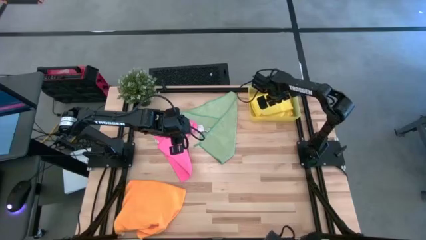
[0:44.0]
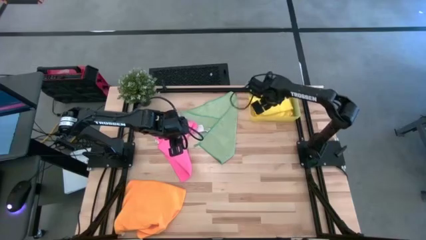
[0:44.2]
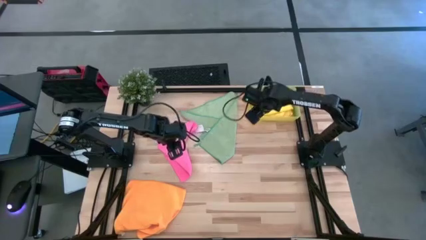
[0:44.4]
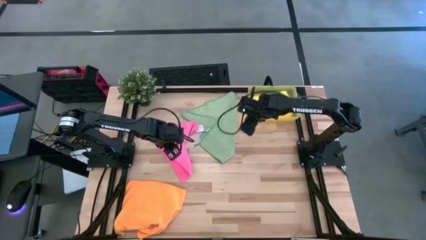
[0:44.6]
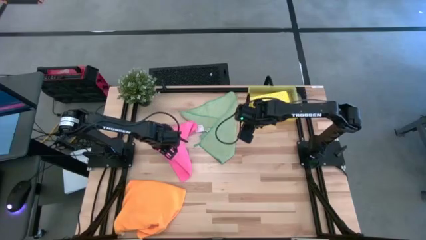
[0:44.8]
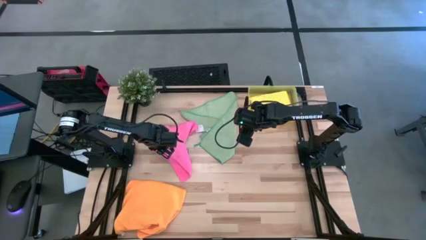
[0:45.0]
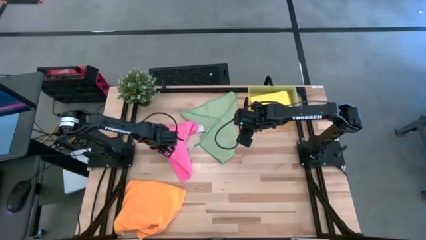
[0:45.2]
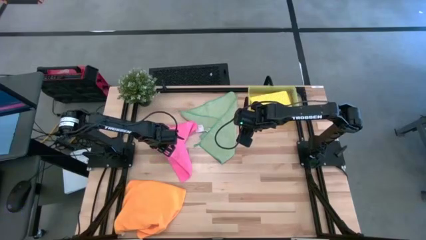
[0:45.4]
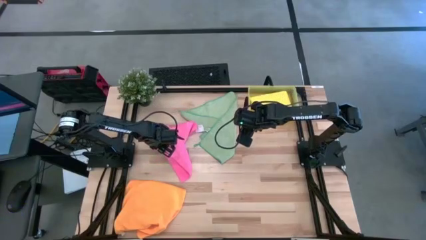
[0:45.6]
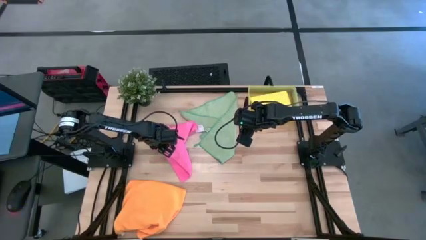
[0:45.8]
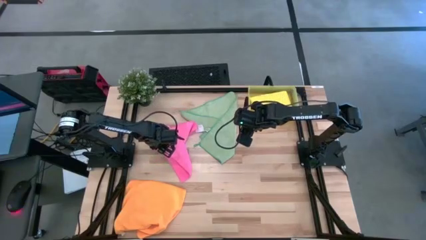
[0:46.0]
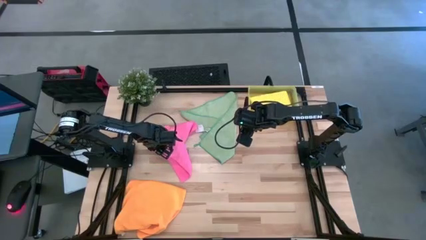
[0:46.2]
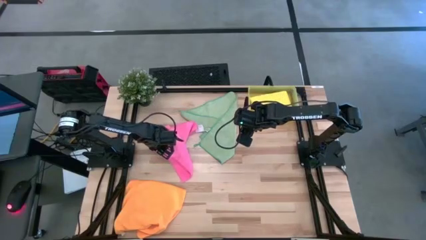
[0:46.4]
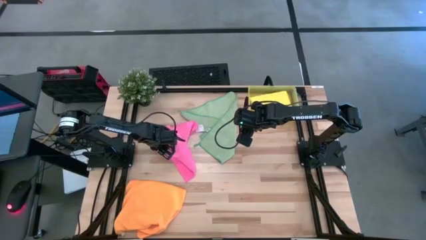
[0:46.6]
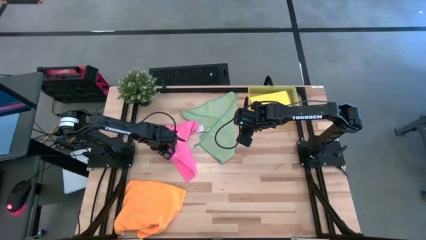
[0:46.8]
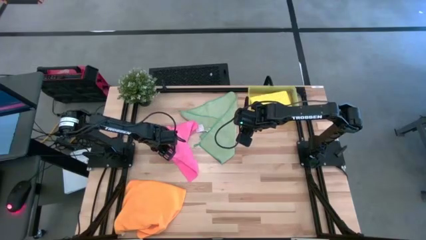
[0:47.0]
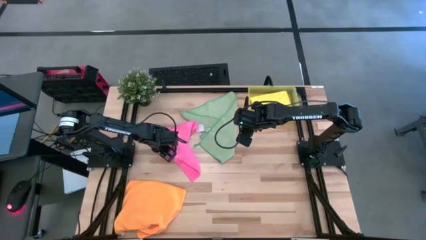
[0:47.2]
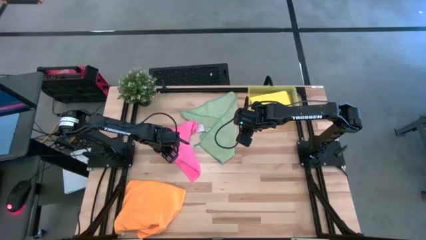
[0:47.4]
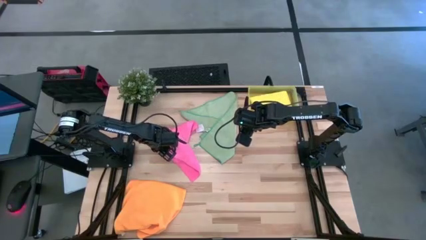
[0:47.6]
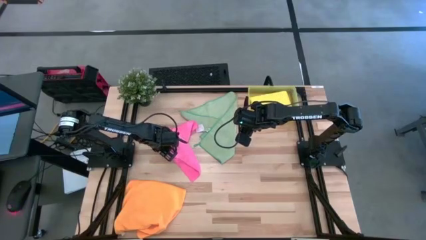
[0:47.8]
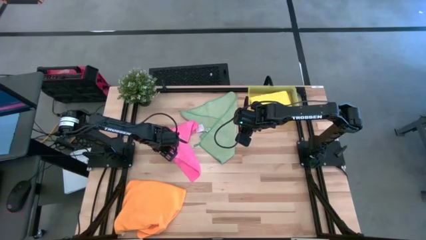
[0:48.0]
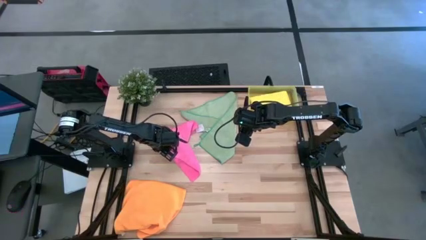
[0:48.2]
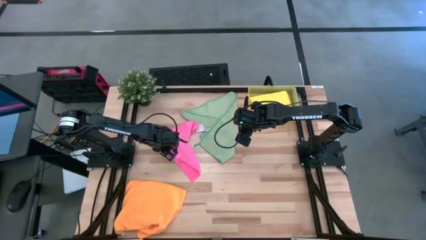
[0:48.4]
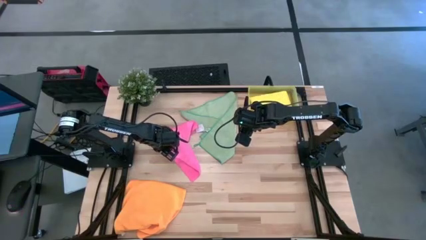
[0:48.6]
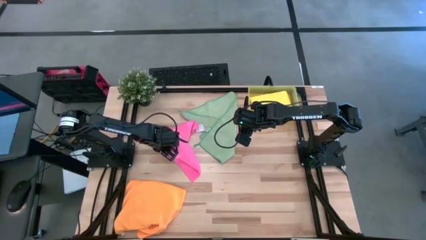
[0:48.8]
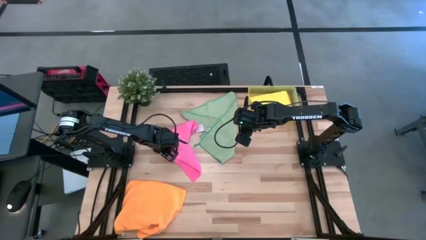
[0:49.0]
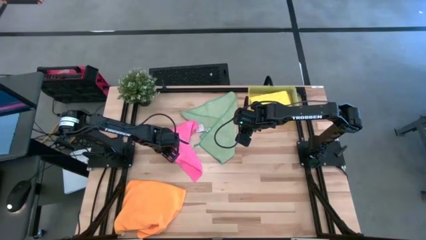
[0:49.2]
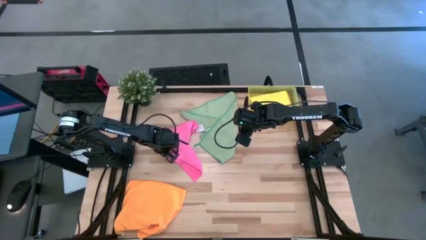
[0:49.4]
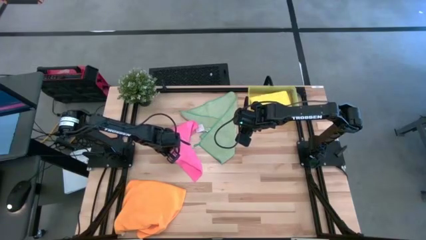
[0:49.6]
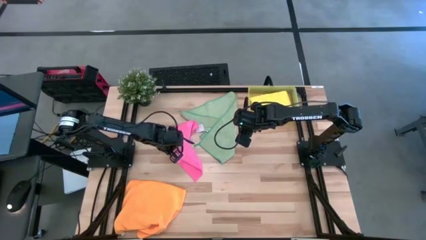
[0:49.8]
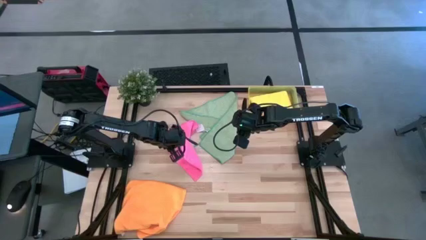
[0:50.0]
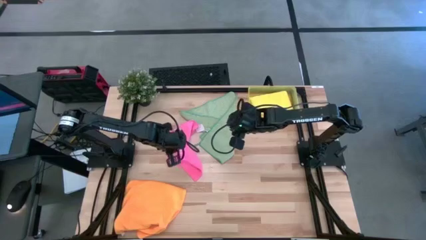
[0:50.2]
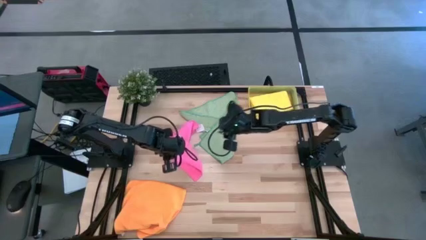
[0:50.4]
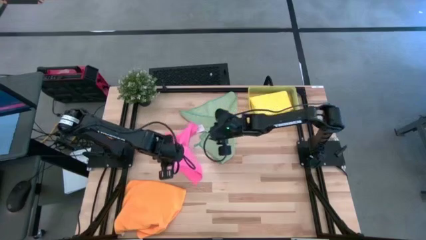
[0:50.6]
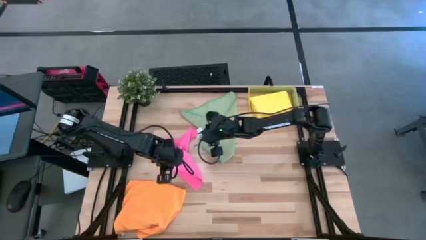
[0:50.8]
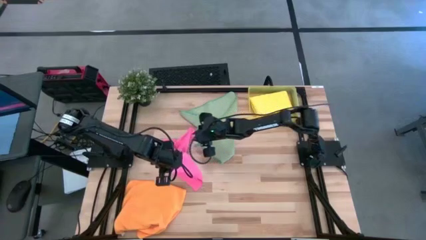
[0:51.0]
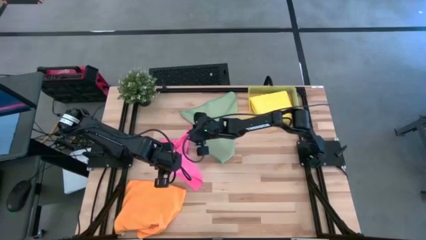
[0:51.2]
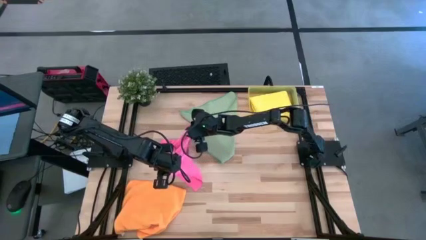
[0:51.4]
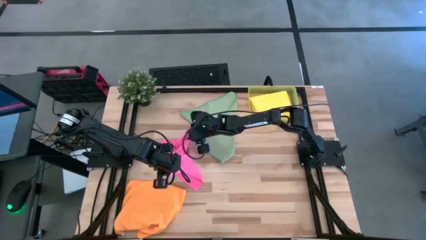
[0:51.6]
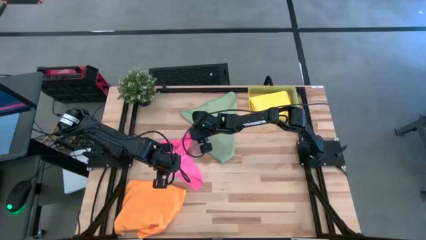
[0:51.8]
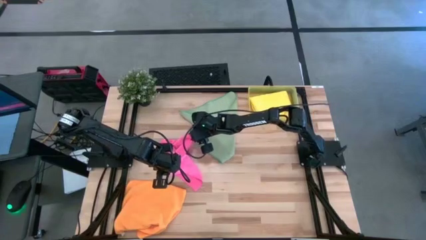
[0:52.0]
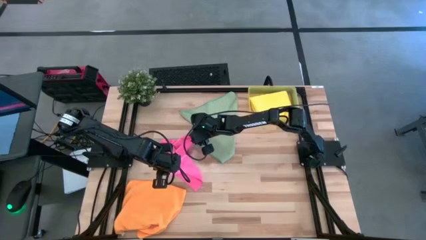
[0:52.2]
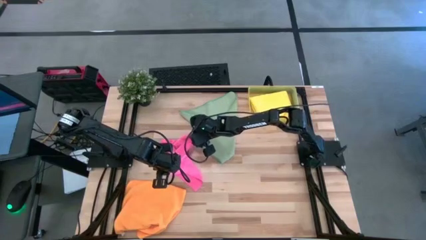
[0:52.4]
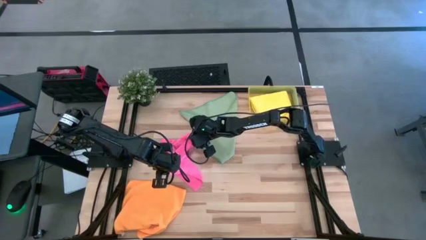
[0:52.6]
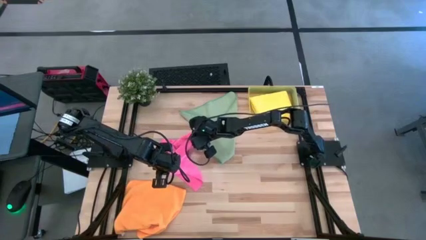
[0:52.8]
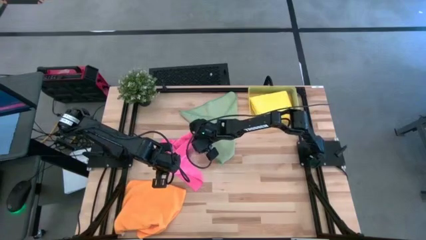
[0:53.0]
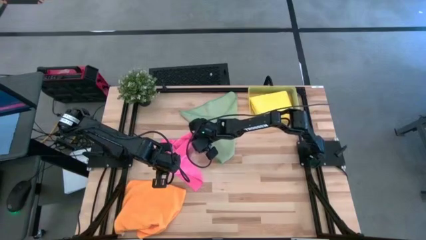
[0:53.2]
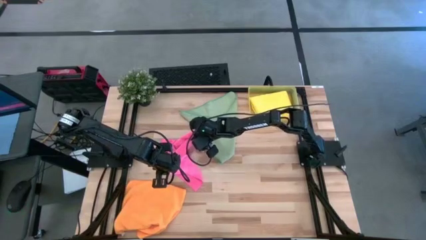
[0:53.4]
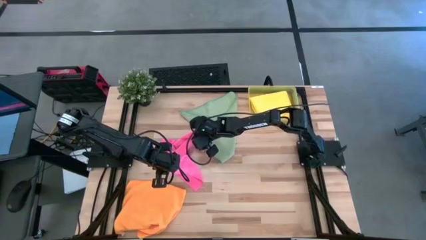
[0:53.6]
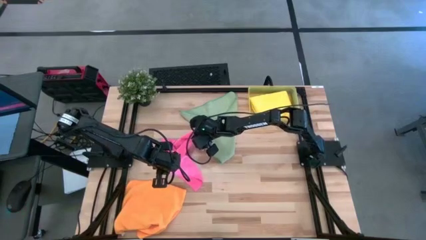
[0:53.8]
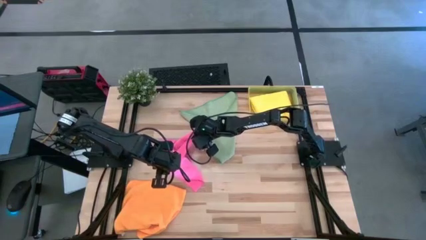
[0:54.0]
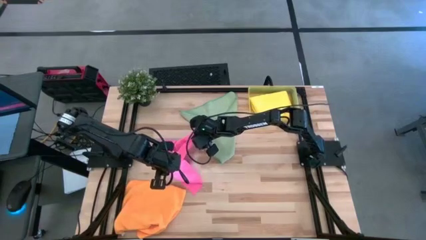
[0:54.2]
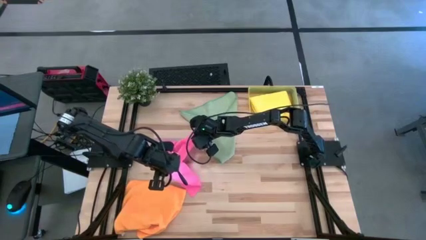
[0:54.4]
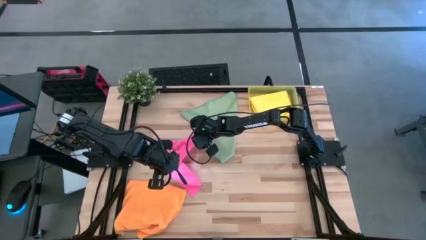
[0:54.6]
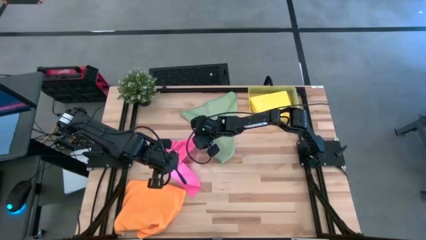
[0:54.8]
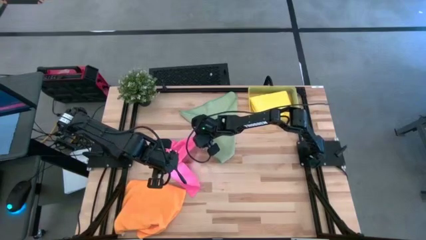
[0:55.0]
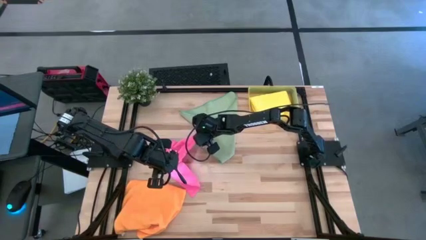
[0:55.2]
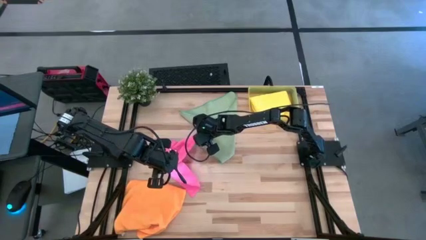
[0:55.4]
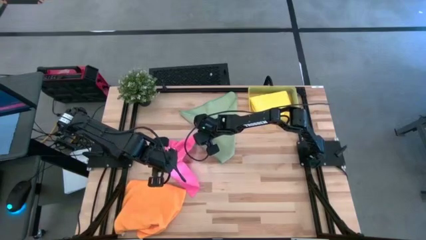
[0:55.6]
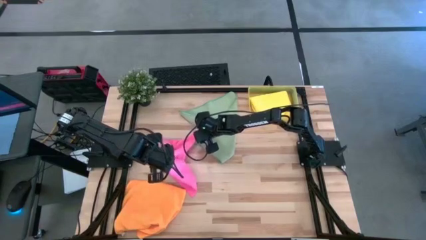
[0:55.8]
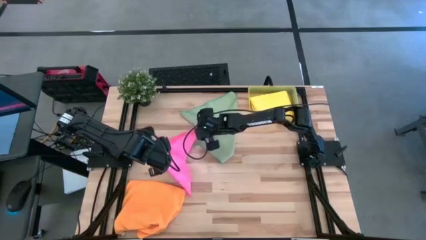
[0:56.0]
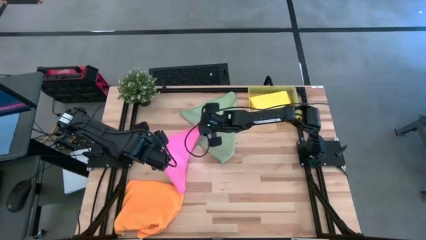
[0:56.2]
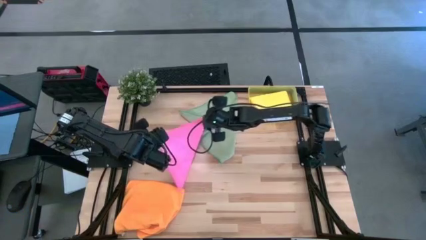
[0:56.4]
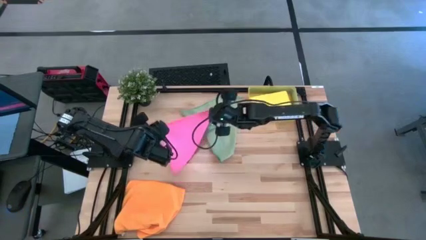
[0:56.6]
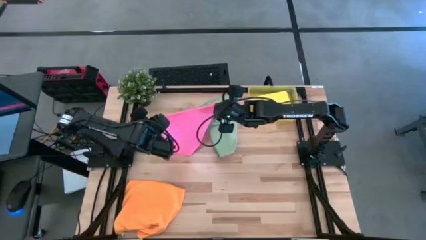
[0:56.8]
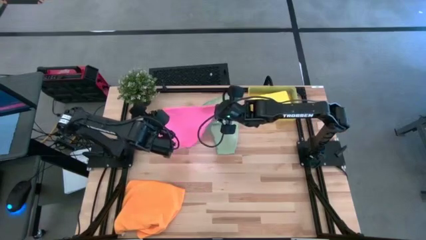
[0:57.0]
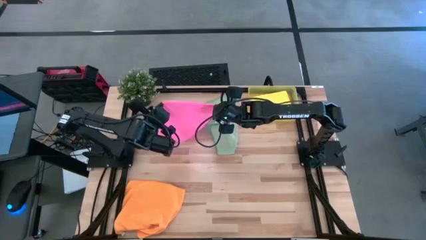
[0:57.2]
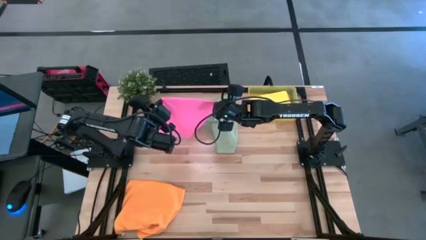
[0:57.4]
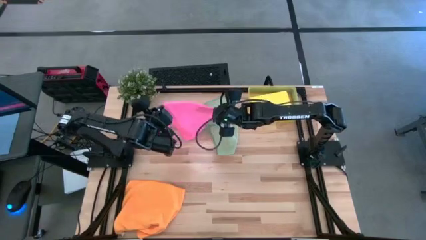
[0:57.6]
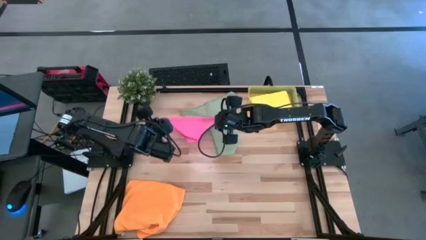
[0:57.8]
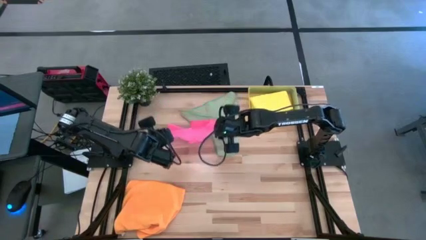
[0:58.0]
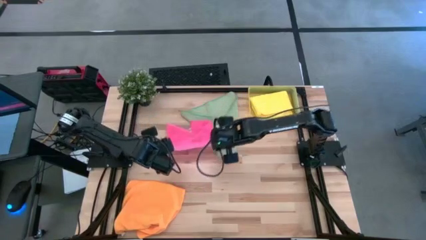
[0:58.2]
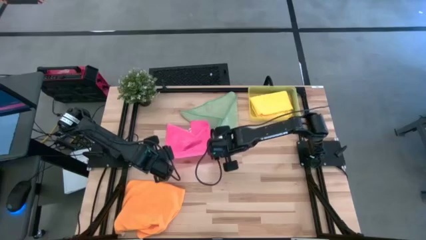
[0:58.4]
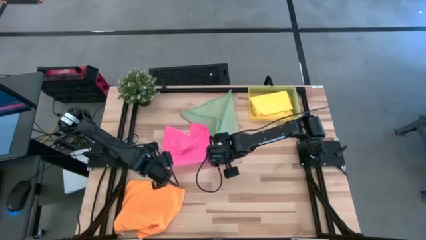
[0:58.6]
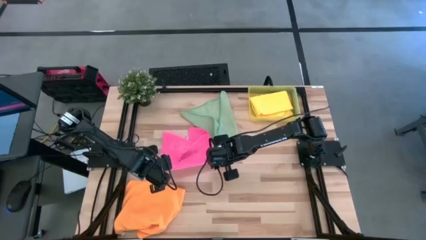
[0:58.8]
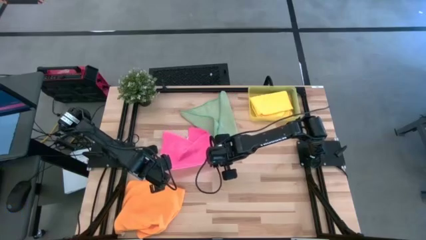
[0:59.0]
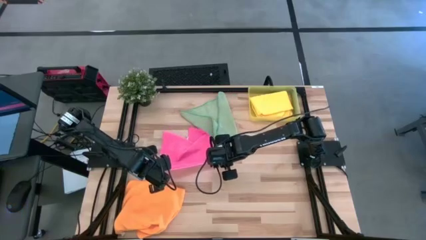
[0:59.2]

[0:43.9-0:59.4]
Task: Fold microfiber towels
Fold the pink towel

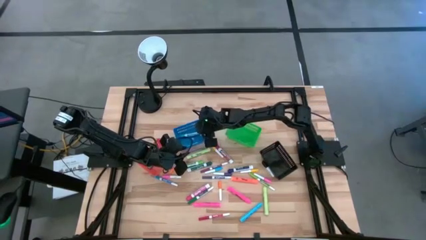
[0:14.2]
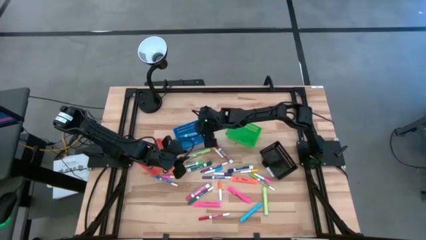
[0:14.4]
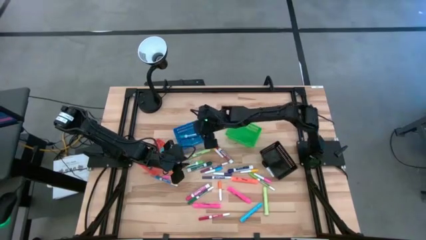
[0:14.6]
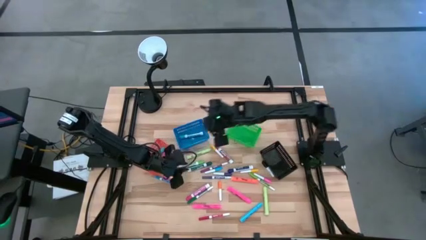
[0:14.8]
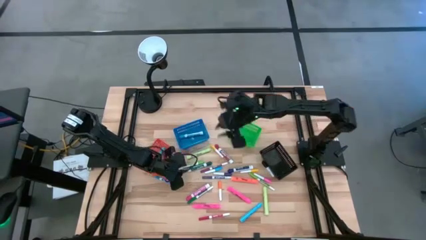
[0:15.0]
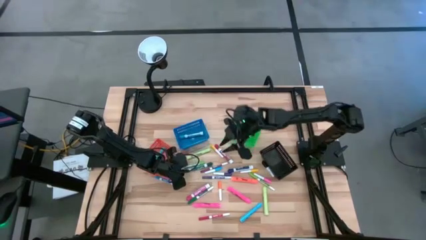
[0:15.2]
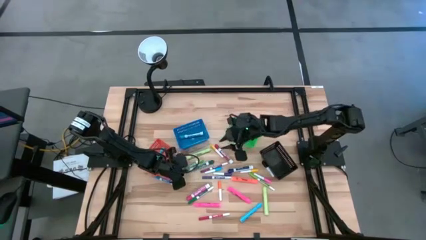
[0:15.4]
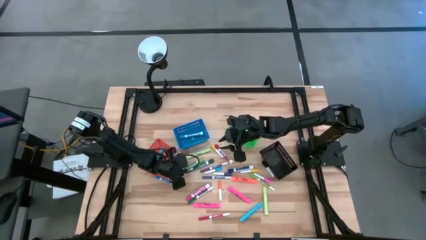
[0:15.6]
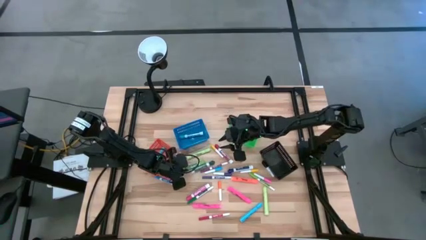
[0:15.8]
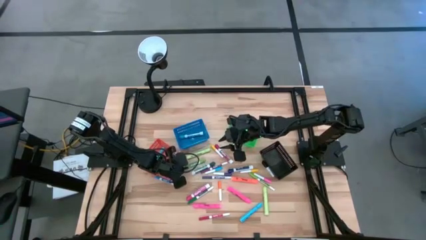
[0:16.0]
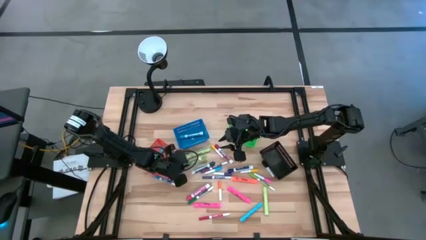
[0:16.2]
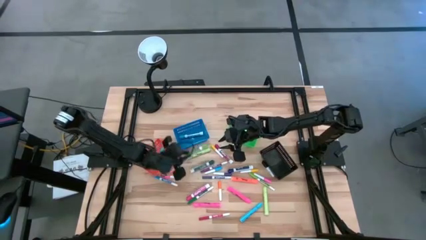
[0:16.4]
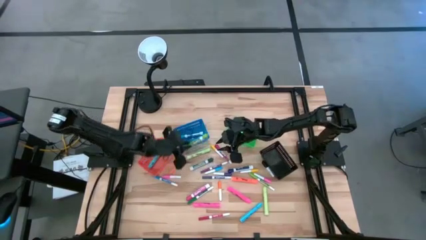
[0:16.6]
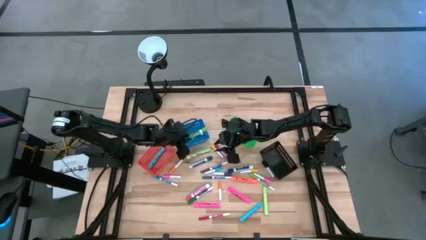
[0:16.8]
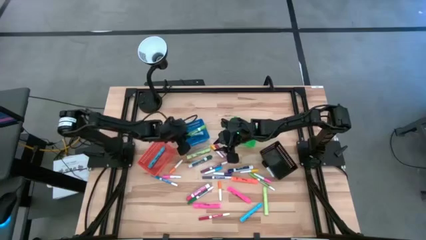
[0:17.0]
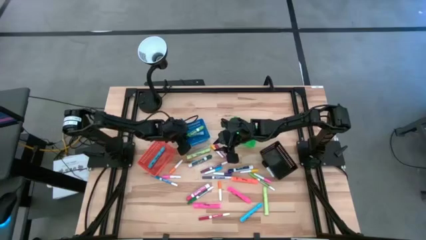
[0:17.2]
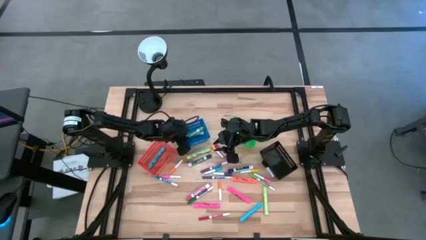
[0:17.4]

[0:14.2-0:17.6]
Task: Pick & Place Markers
Put the light green marker pen into the blue basket
